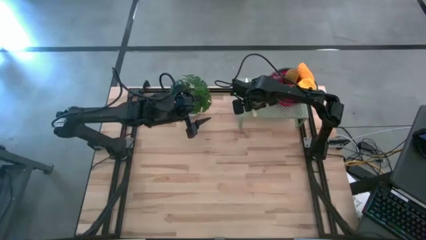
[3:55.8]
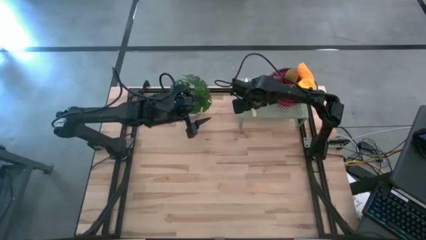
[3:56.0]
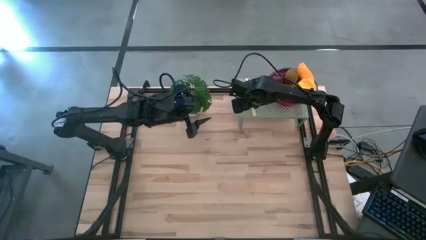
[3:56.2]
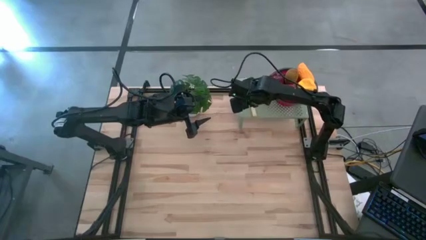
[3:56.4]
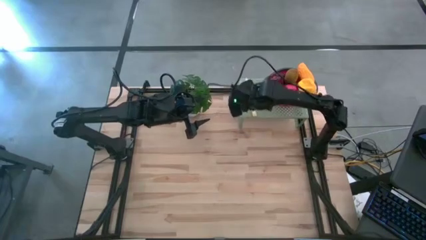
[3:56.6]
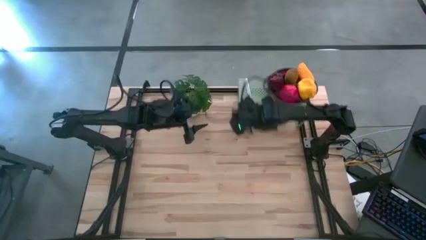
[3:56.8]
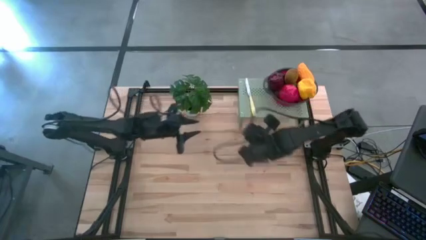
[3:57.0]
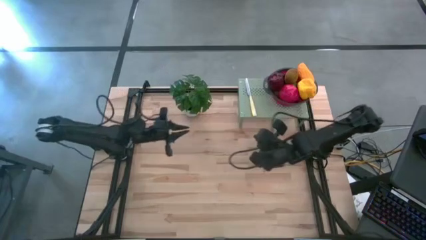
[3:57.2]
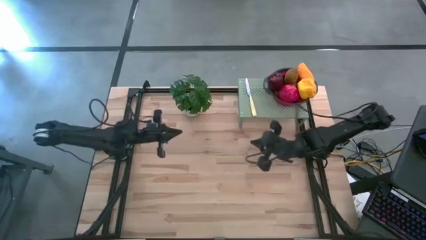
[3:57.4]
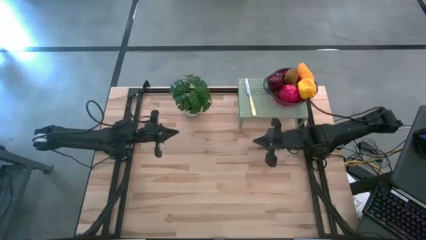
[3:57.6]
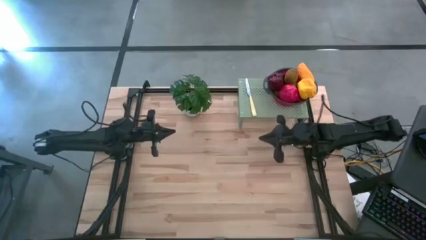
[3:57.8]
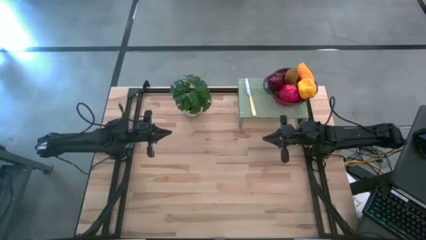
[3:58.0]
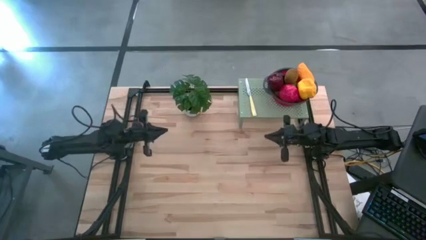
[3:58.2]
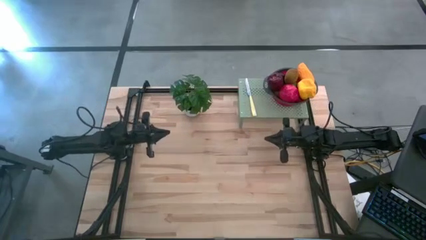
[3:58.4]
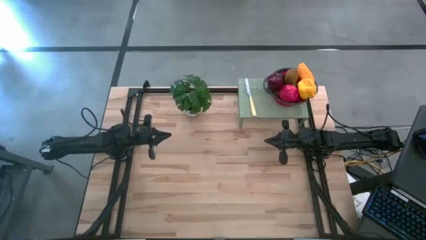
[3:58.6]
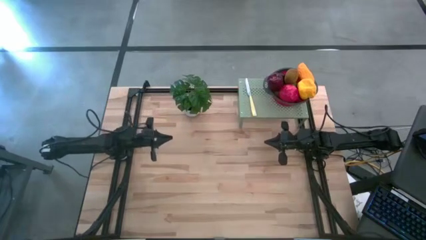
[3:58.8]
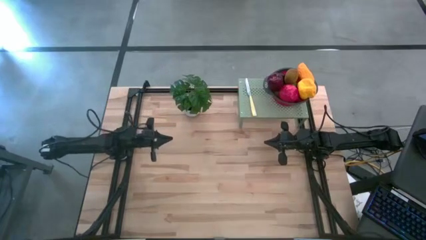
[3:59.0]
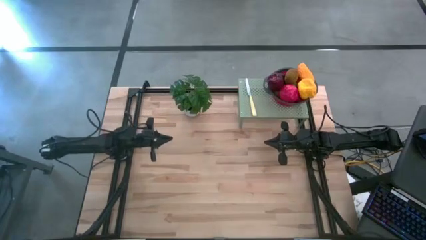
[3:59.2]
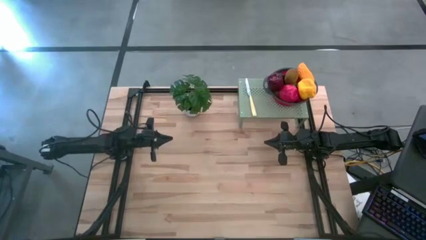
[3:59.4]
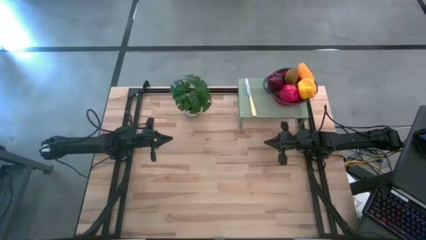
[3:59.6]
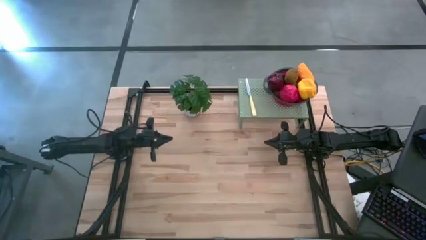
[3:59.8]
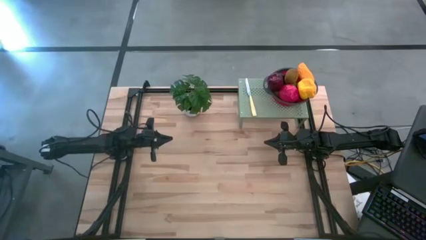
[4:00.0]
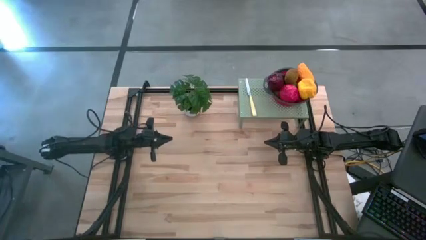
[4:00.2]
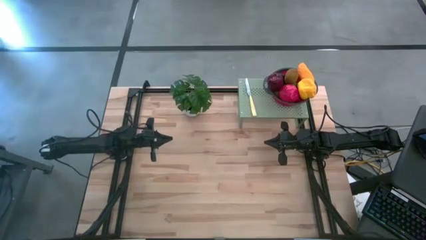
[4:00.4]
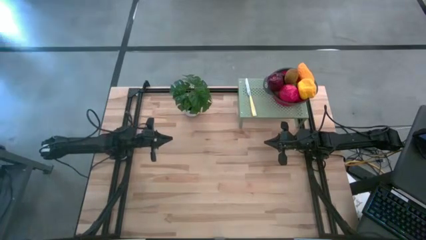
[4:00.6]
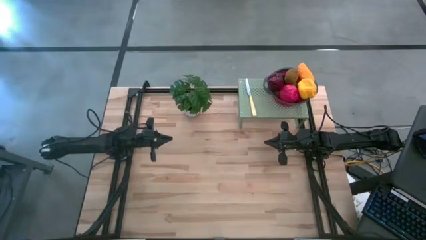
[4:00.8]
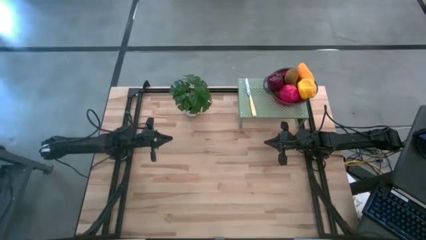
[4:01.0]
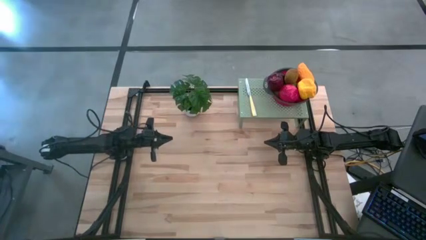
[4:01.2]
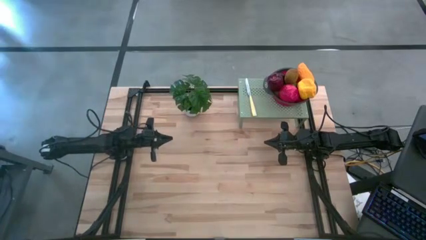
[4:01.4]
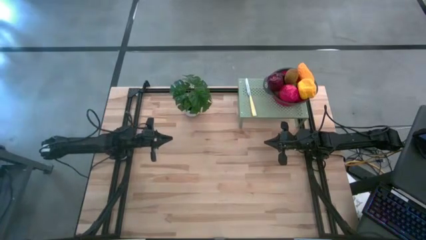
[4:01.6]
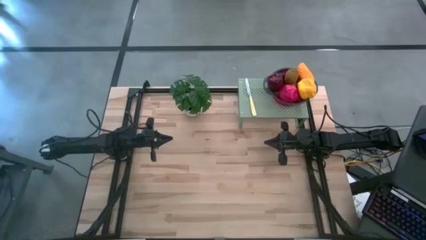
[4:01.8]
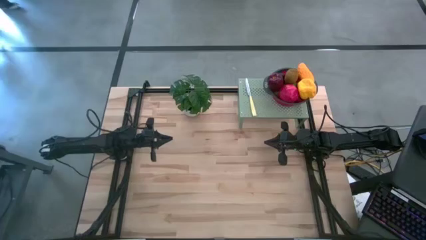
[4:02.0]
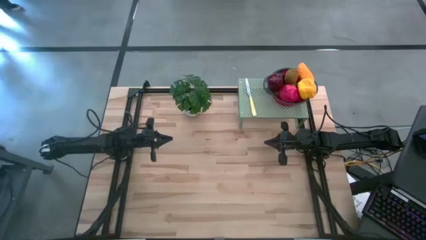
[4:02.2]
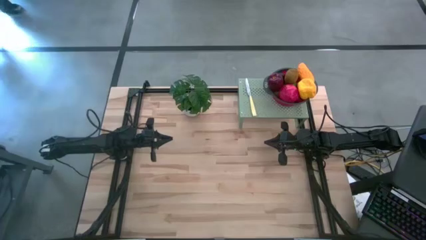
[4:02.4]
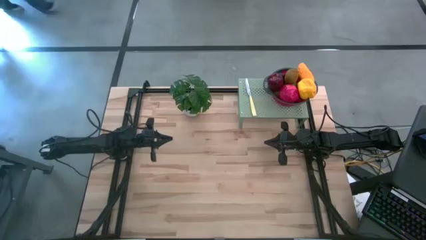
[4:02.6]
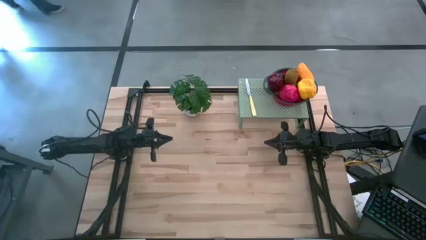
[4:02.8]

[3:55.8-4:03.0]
Task: Pick & Place Fruit
Return to Home Position

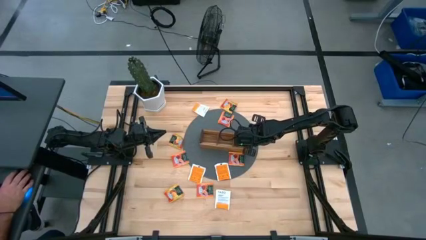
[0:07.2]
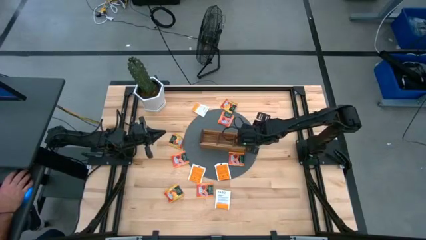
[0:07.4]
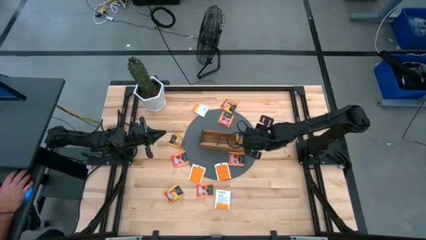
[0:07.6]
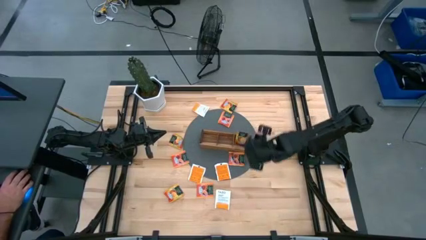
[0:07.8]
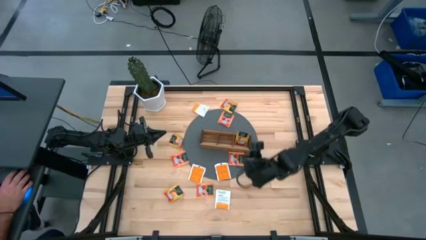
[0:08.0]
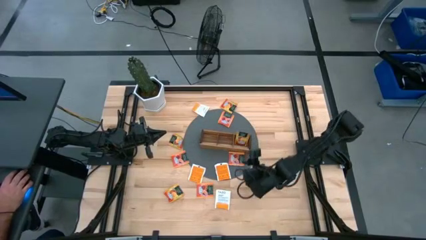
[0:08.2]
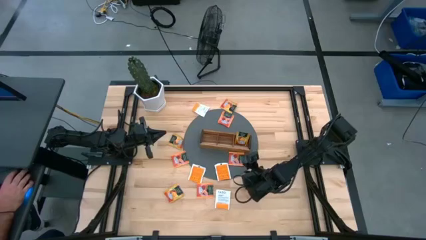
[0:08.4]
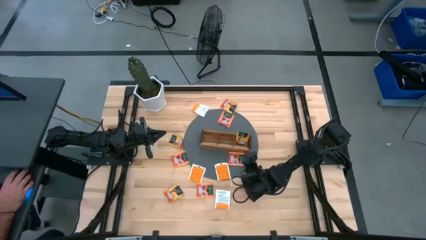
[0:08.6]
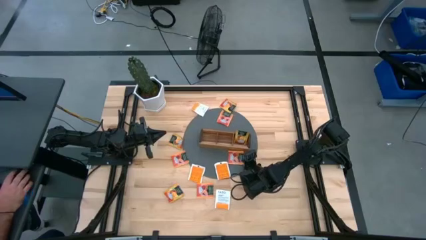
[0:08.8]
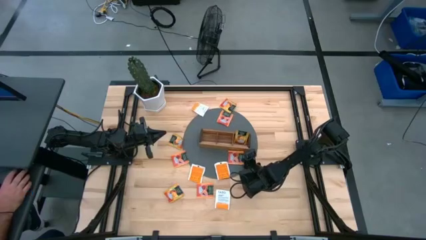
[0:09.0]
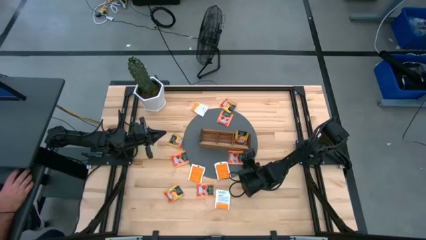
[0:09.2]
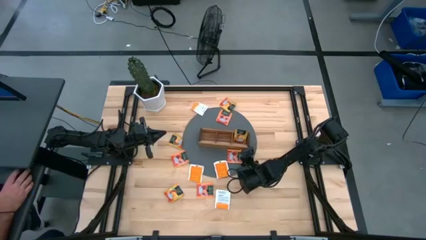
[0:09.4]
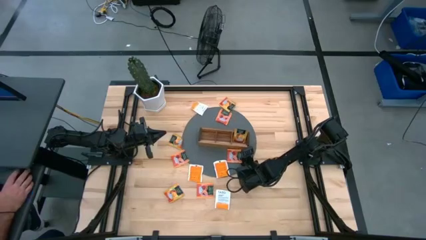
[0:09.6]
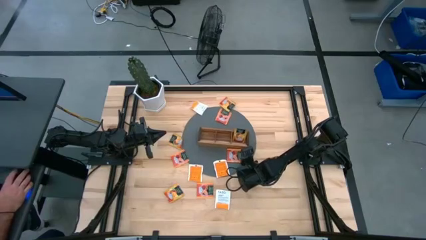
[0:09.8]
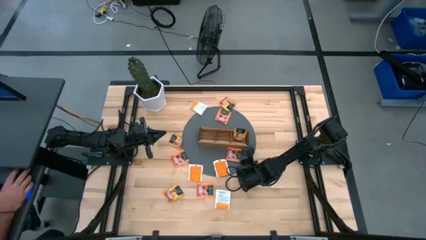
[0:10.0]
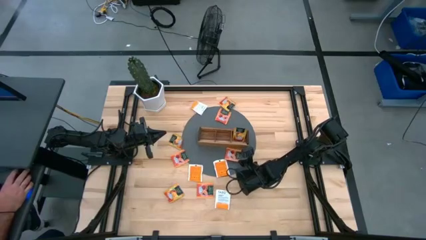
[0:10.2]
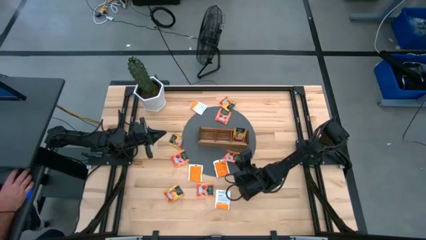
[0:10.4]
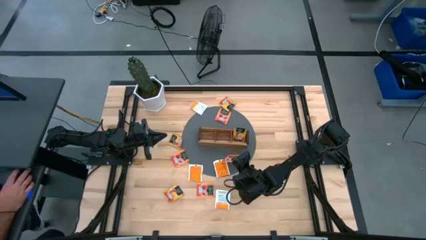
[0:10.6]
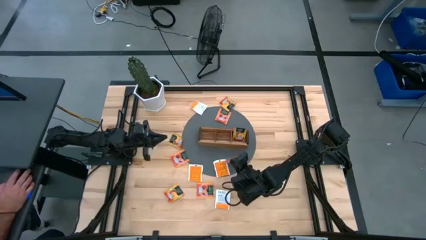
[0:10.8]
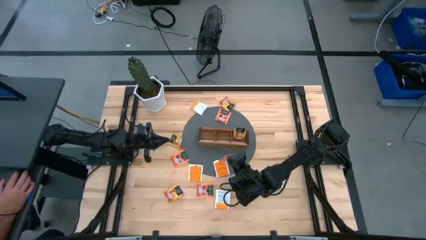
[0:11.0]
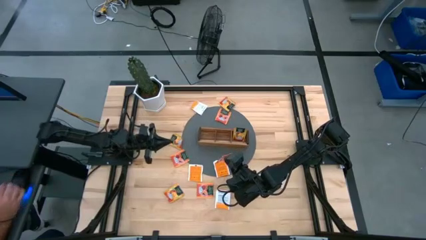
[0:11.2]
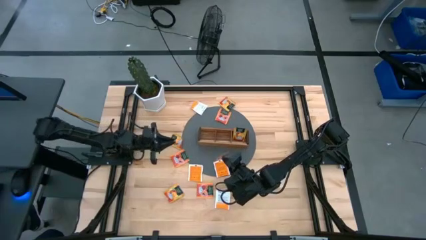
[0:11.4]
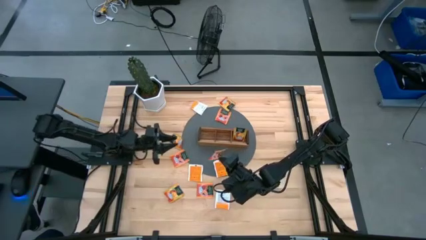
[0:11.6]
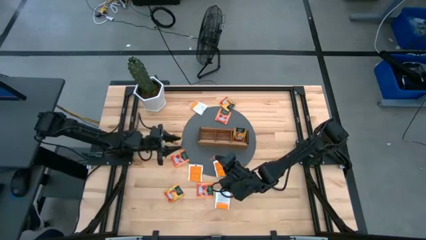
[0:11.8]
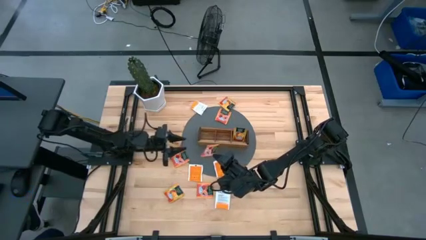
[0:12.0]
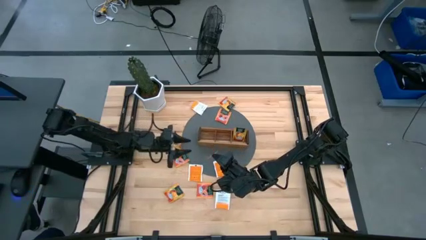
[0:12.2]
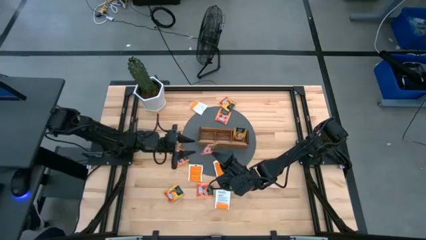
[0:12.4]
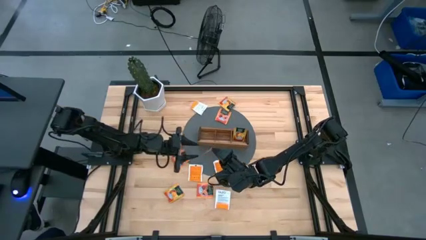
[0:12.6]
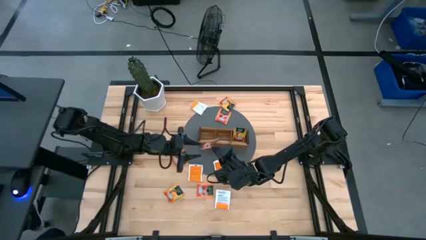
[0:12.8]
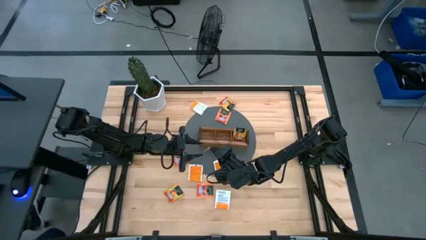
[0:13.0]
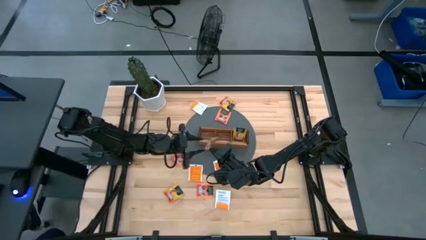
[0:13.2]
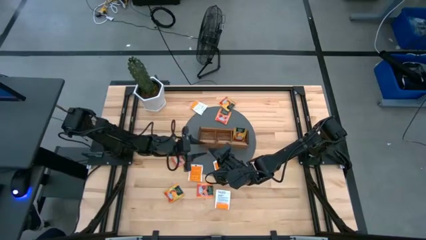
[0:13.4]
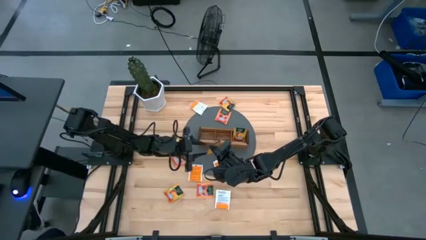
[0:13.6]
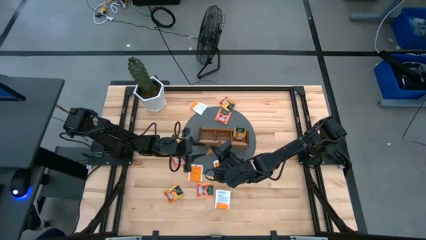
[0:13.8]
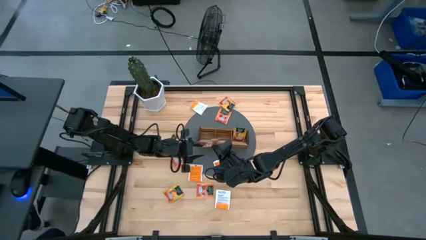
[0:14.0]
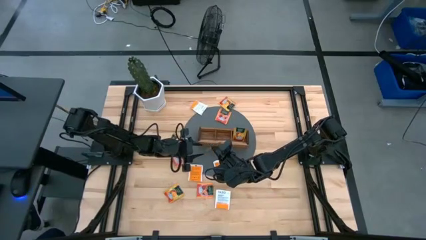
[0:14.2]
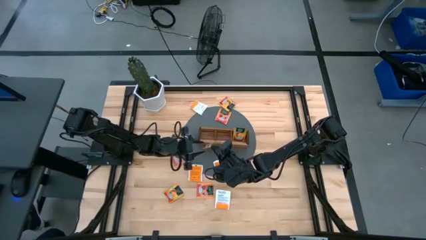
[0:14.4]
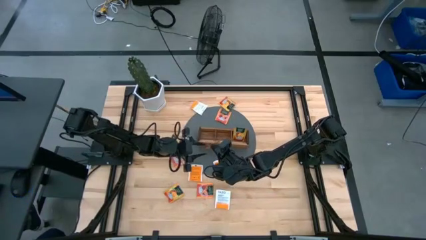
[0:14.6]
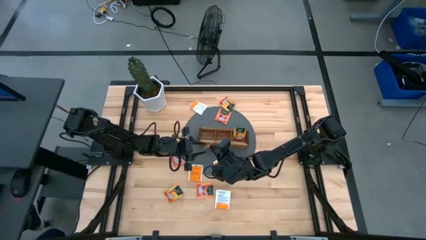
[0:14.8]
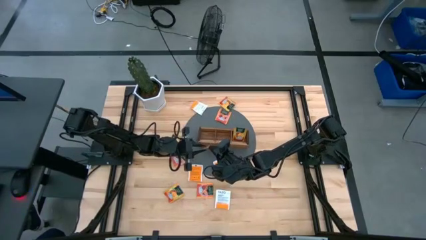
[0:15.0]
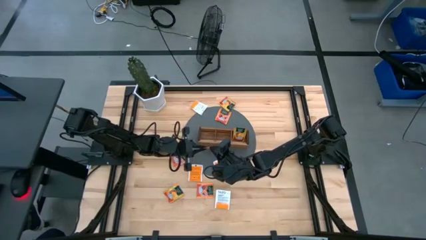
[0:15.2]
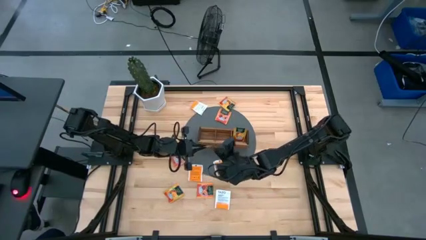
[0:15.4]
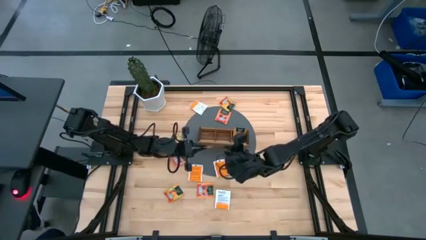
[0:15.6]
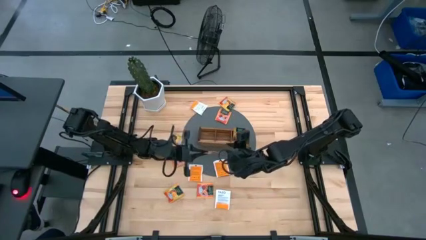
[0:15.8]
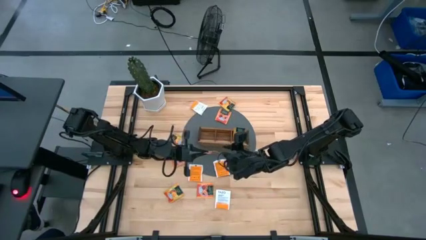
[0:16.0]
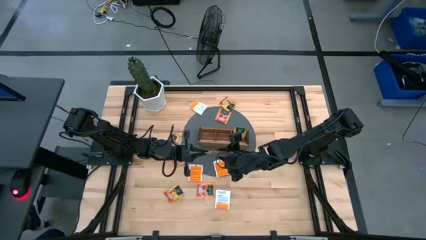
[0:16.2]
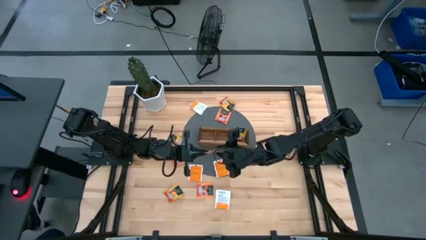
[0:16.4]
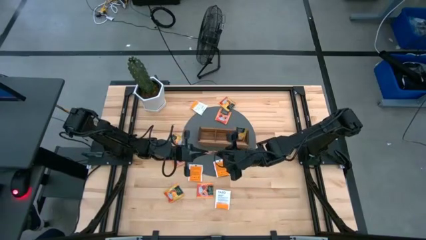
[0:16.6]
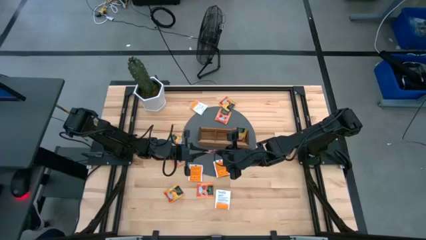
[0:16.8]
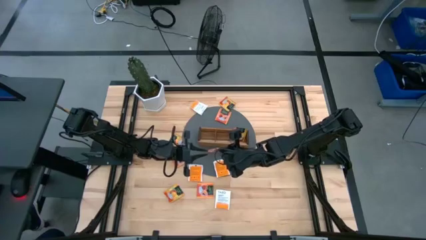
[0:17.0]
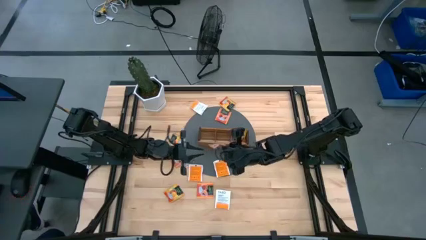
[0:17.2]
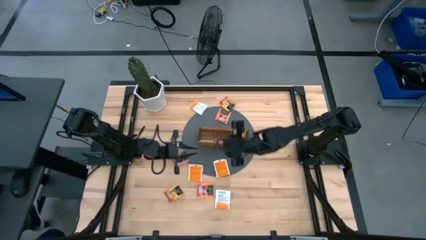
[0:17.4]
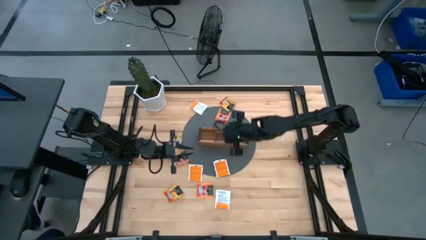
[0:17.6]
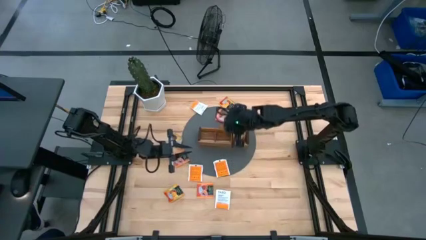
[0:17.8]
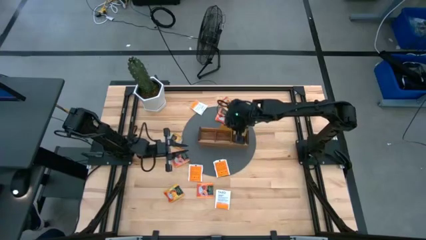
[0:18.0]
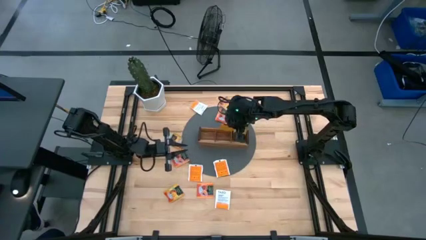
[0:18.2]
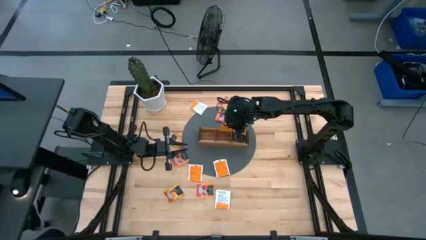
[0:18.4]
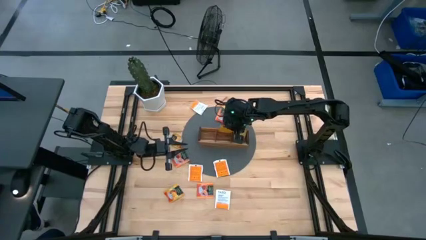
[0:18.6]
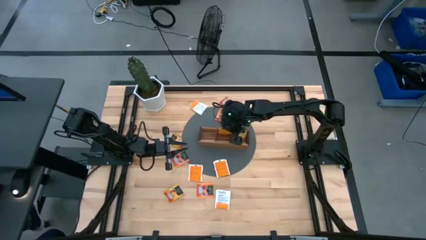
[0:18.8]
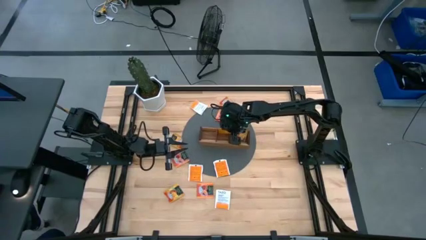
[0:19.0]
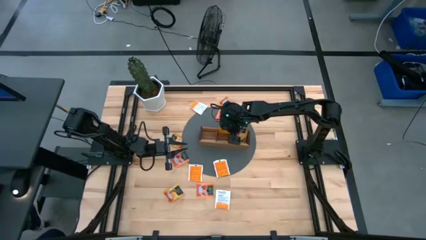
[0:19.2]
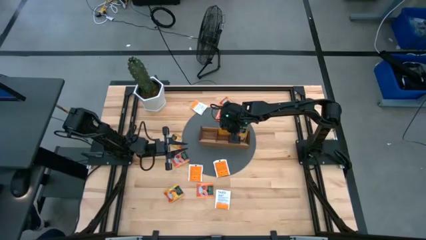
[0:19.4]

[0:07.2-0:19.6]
Task: Pick & Place Tea
Put the orange tea bag into the middle section of the wooden organizer
